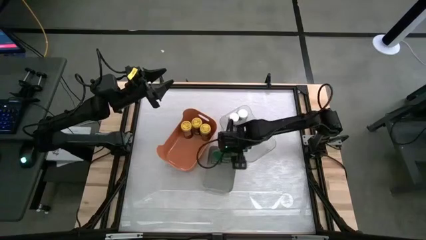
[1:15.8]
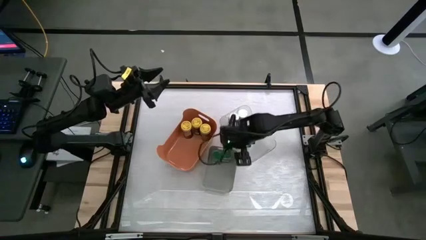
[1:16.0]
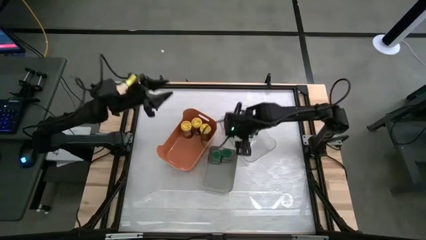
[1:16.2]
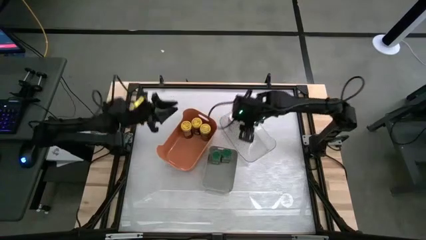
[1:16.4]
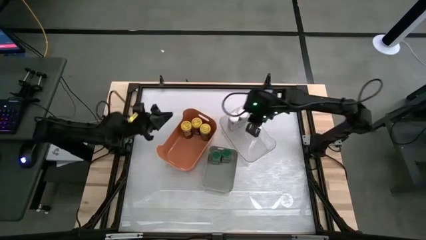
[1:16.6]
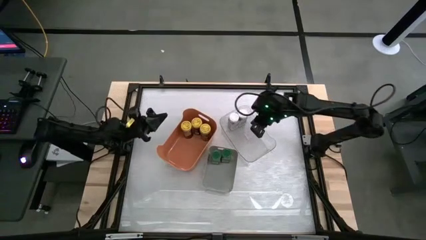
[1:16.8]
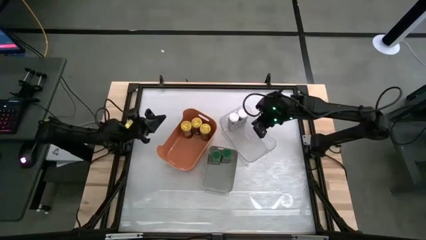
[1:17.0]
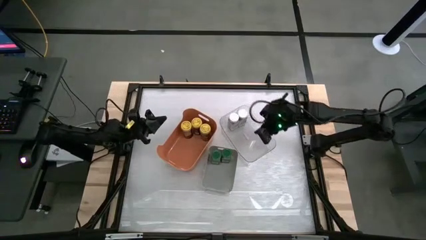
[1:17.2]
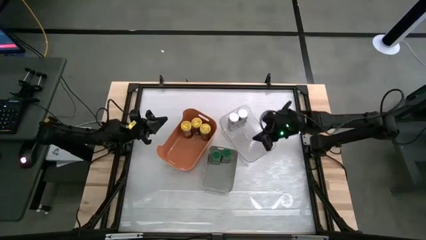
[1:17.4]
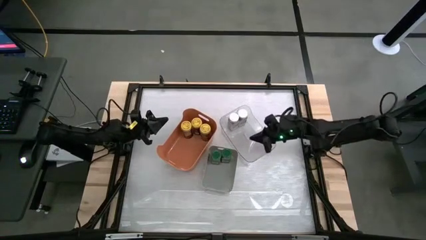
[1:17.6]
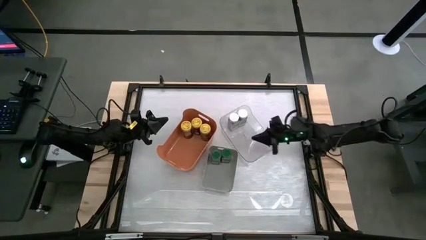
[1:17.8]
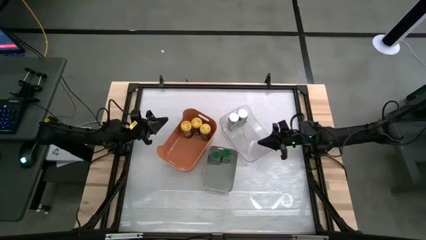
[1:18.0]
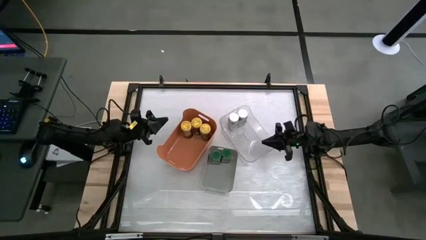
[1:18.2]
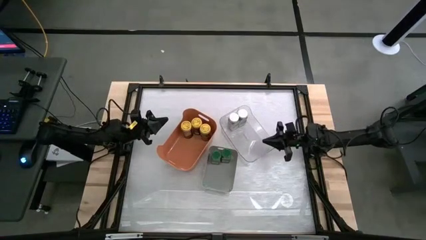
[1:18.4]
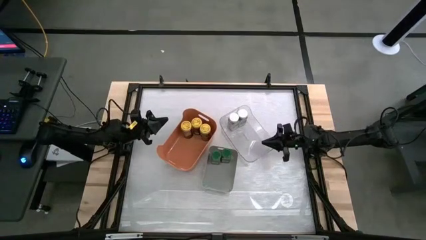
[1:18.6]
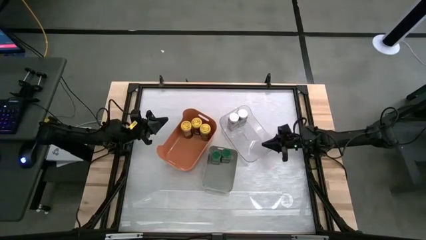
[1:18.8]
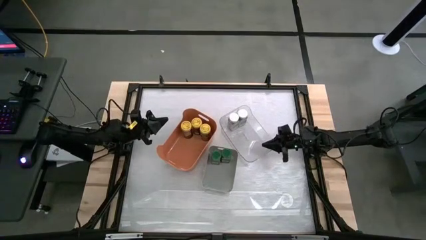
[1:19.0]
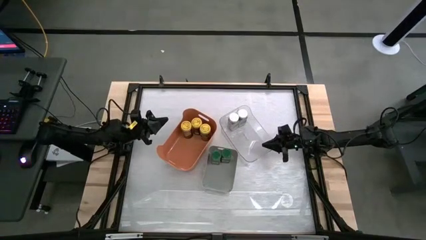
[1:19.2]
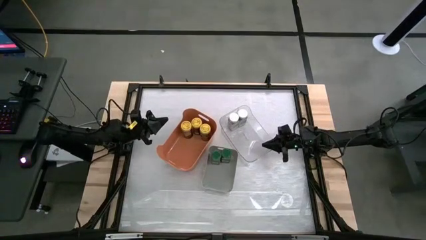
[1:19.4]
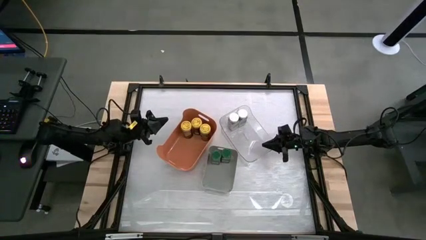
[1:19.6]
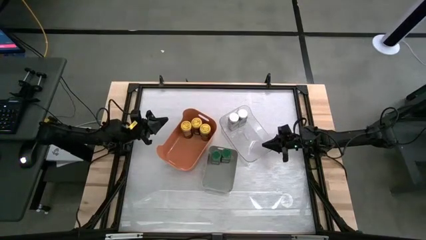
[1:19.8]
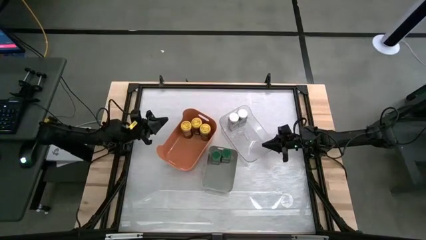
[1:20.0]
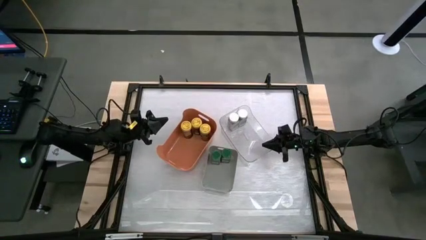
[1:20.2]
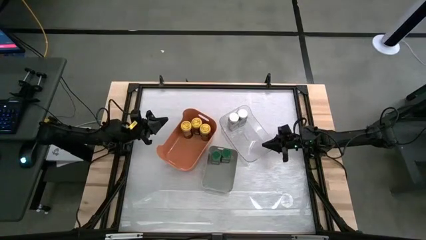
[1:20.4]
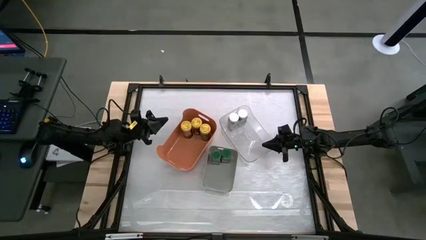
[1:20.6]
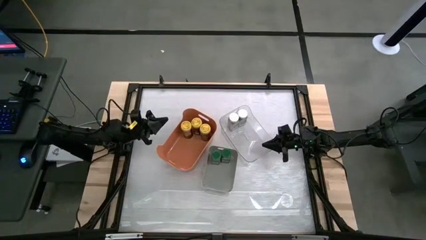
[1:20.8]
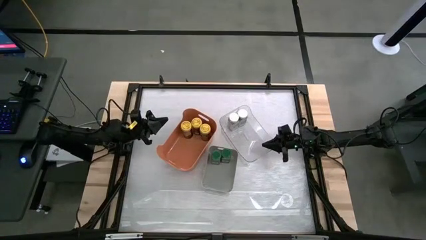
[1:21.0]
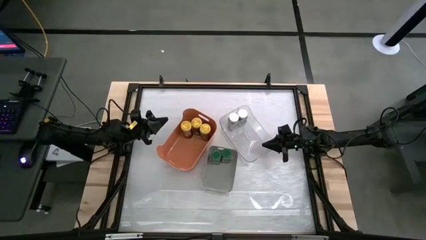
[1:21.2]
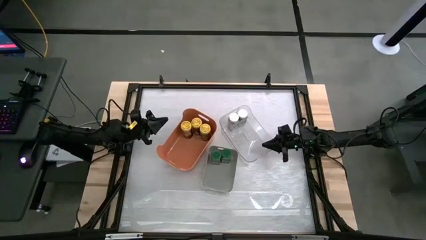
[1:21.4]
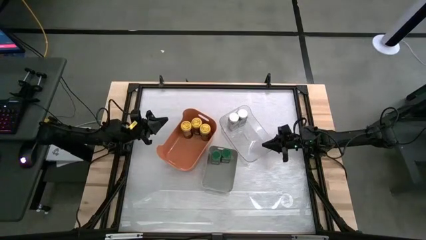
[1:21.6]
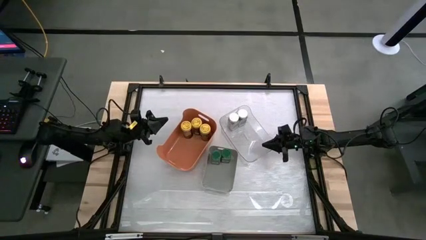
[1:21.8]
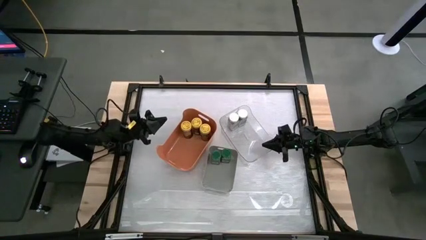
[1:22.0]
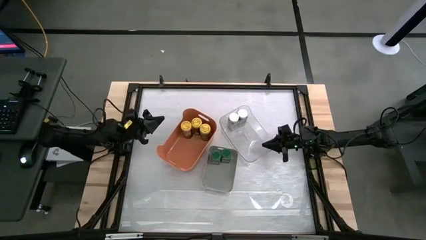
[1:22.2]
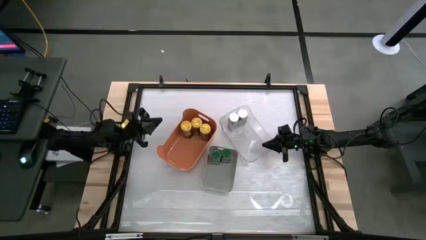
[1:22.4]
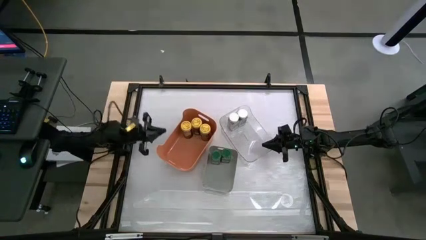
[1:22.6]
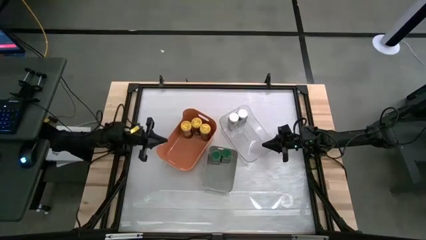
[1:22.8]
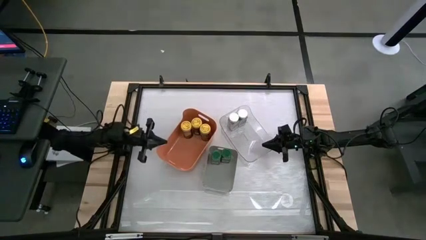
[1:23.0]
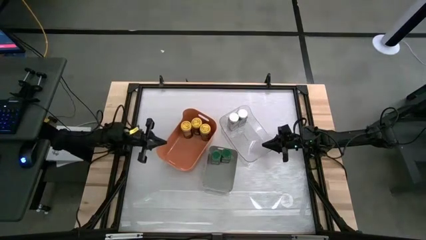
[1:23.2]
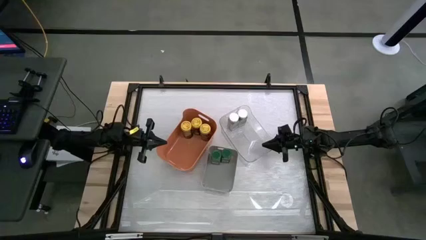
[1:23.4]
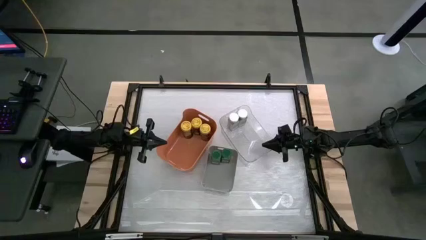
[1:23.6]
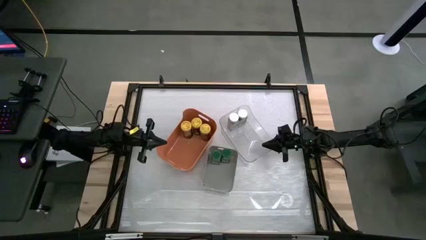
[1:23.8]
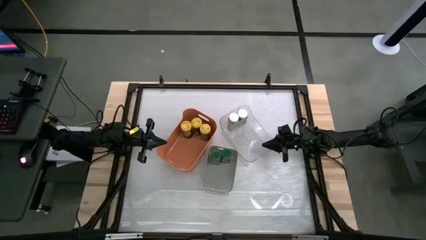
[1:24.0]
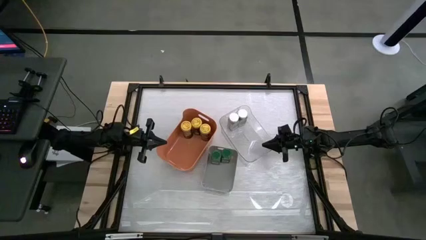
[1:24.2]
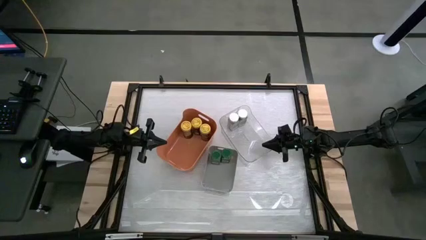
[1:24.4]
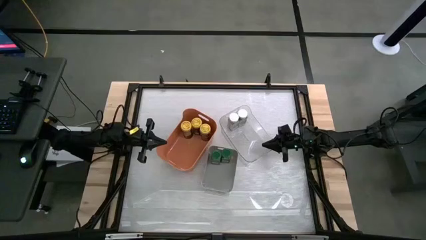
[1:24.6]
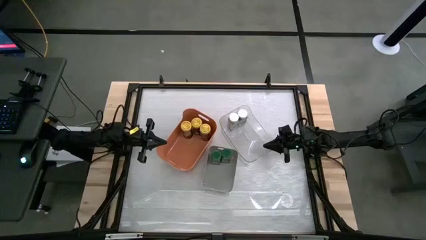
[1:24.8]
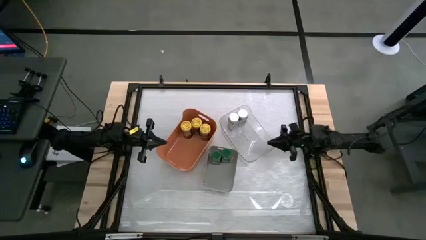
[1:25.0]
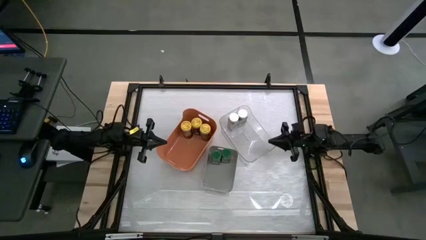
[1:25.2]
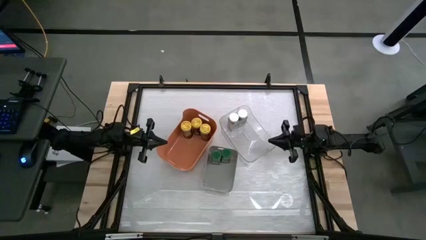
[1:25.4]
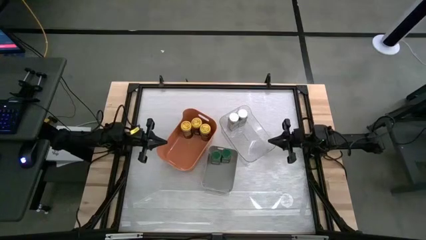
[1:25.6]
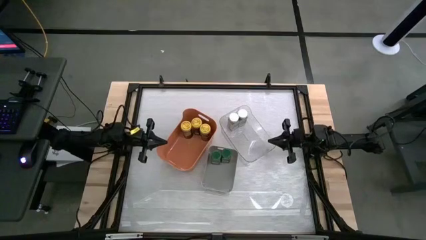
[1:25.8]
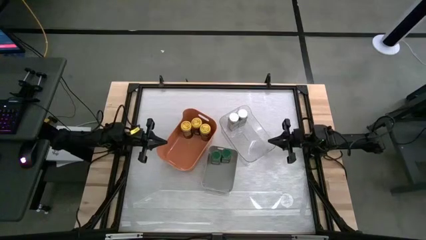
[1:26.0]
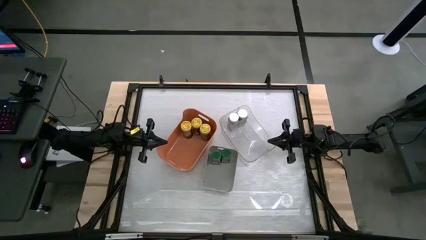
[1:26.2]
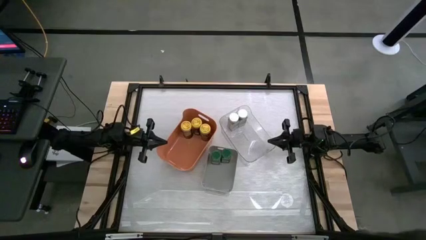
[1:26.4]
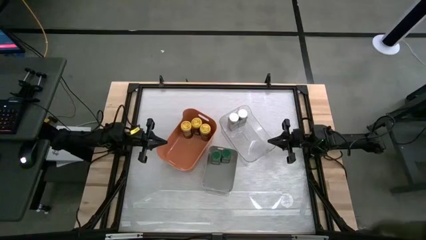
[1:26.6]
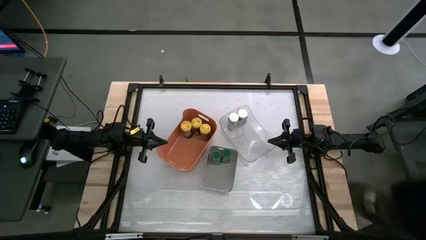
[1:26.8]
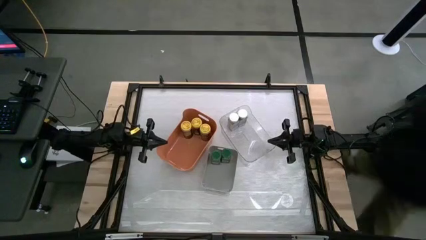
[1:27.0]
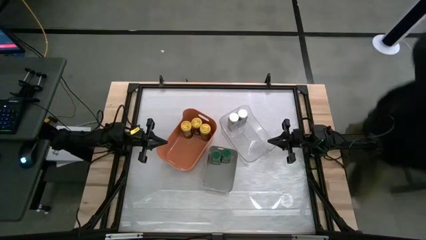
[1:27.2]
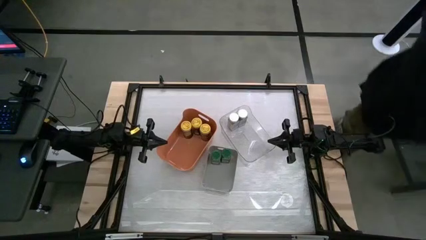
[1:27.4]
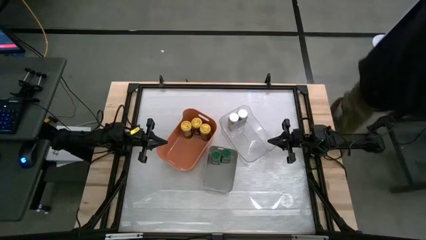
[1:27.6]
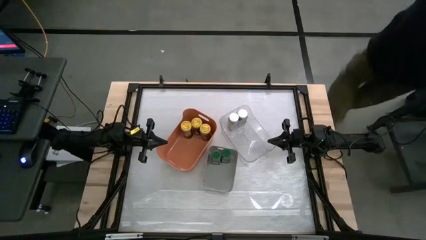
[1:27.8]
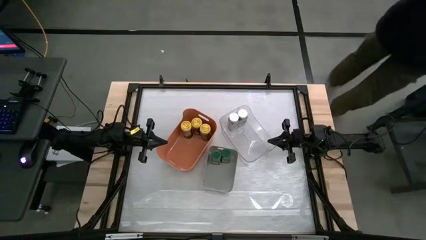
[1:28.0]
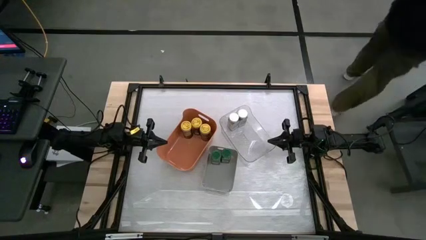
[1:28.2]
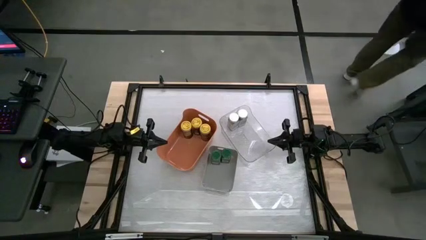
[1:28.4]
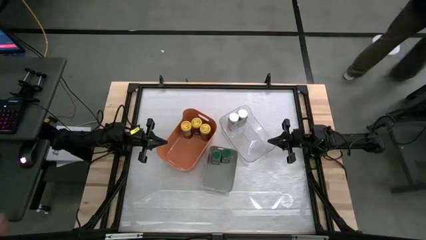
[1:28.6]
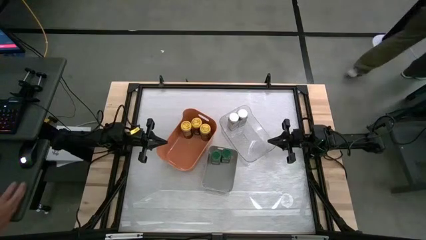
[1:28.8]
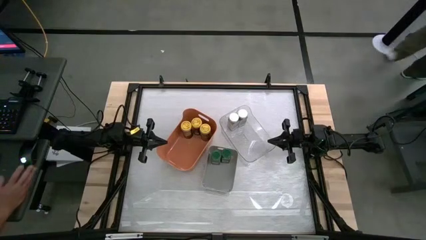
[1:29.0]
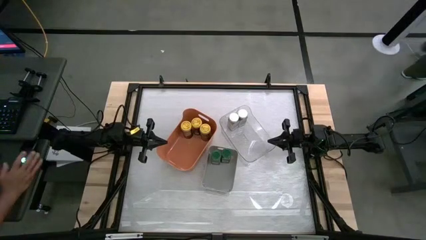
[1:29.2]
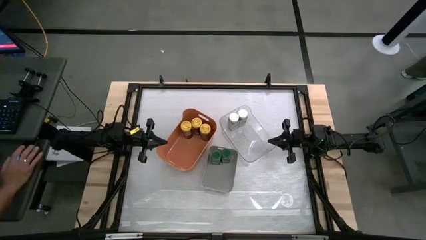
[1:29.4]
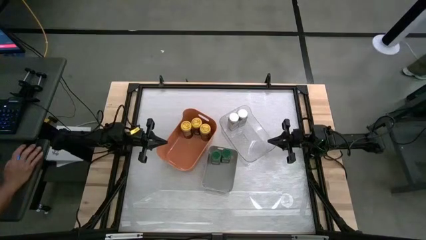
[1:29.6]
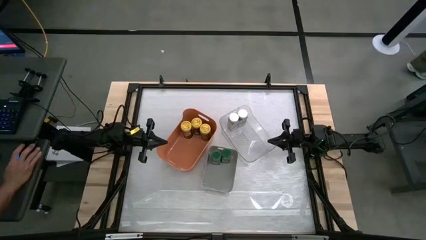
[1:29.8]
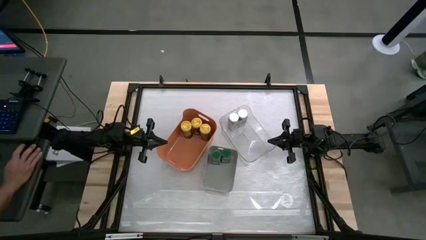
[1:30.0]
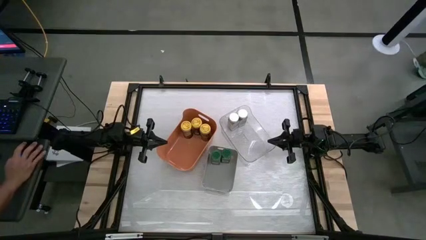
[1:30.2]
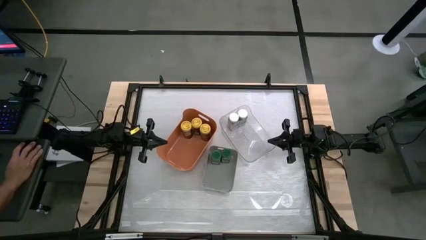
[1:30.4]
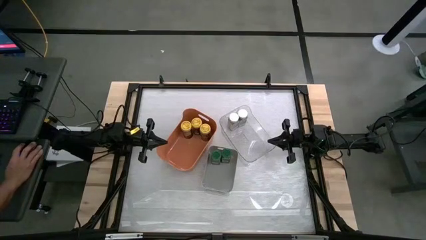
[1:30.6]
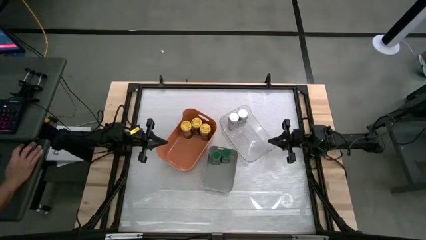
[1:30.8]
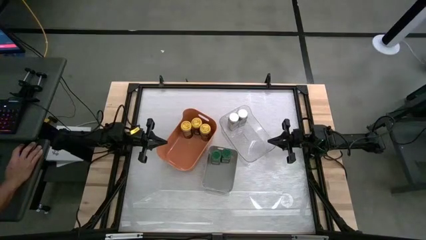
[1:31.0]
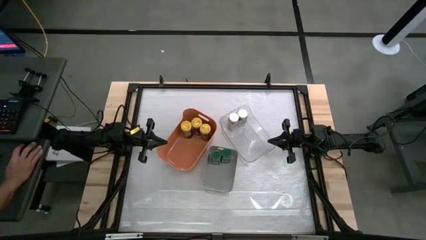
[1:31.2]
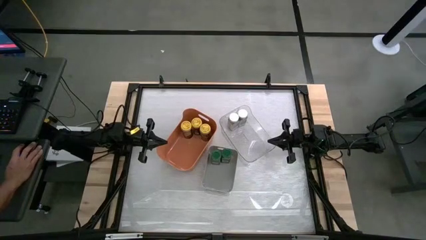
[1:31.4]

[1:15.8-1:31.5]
Task: Sort spices by type
Return to Home Position
